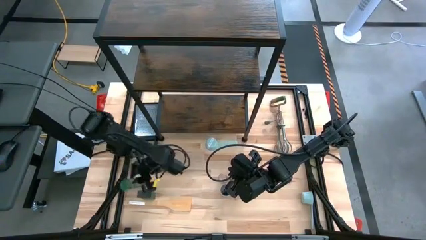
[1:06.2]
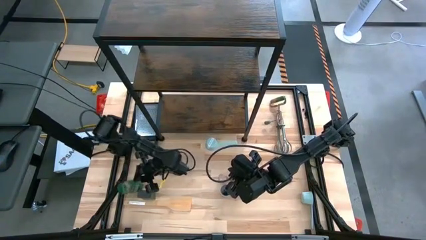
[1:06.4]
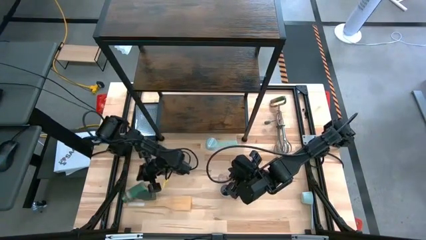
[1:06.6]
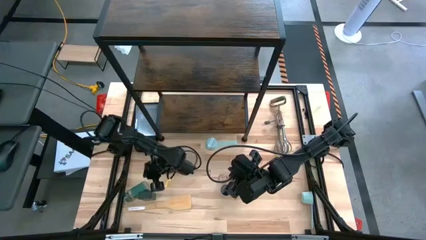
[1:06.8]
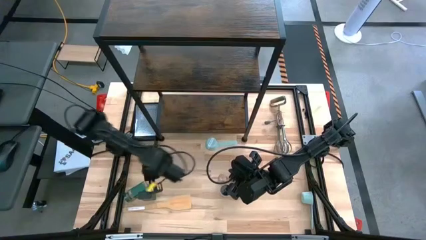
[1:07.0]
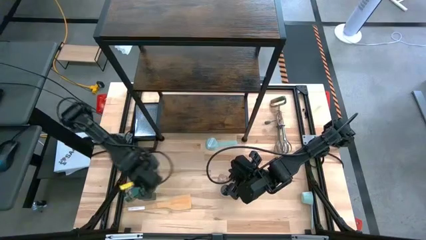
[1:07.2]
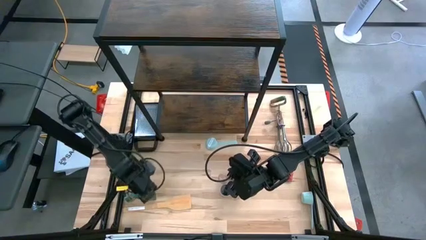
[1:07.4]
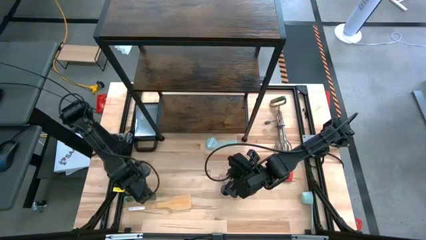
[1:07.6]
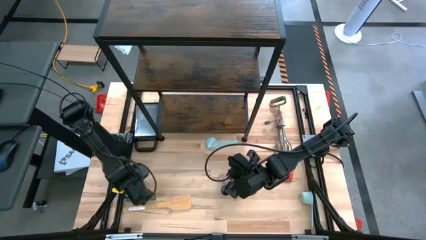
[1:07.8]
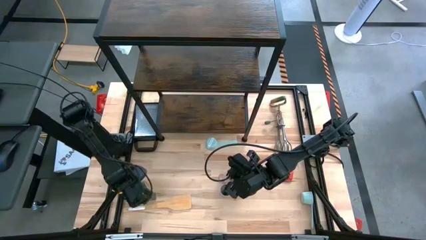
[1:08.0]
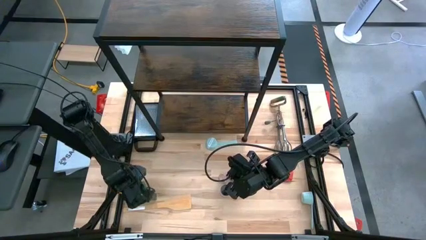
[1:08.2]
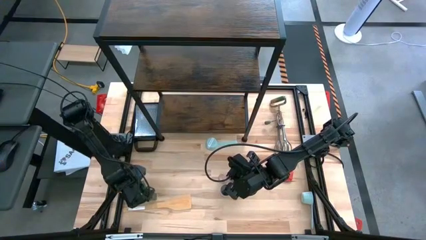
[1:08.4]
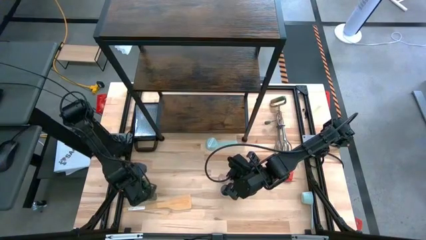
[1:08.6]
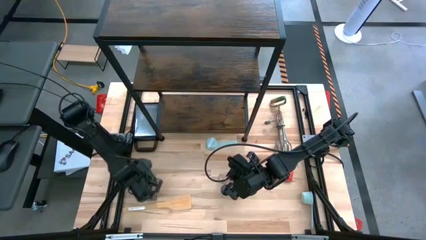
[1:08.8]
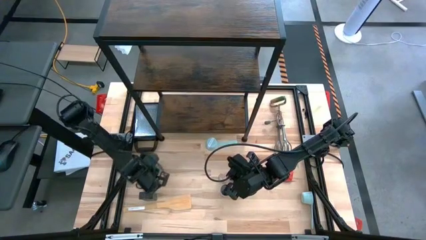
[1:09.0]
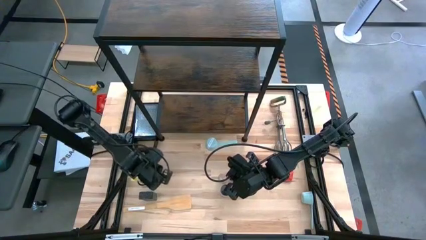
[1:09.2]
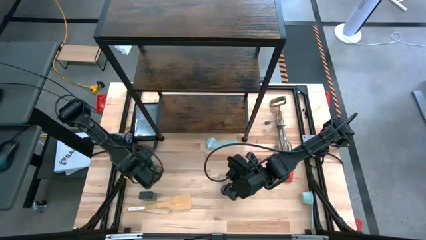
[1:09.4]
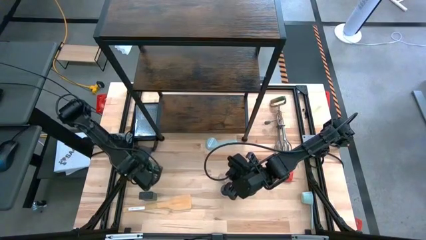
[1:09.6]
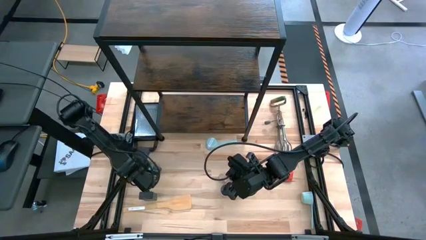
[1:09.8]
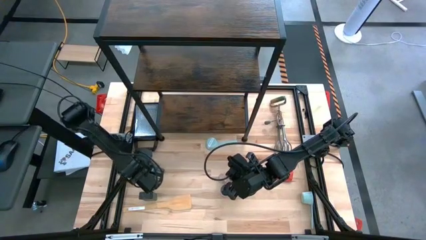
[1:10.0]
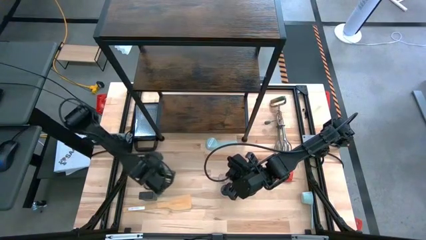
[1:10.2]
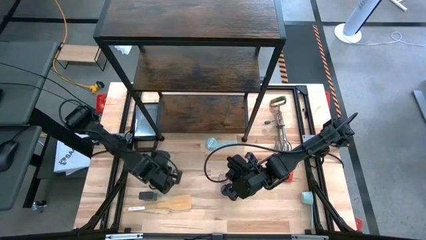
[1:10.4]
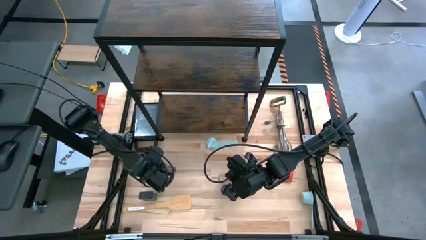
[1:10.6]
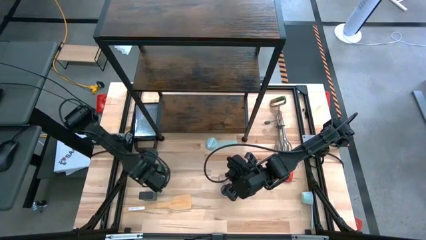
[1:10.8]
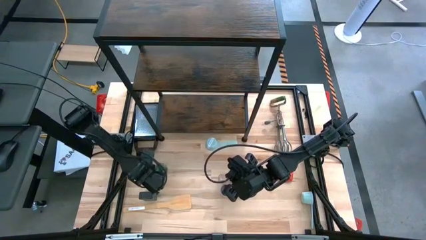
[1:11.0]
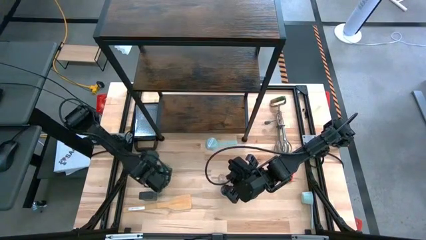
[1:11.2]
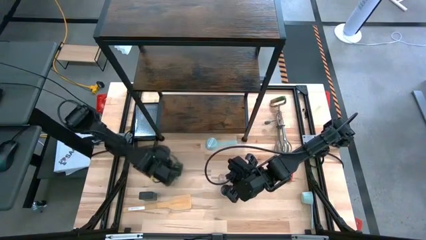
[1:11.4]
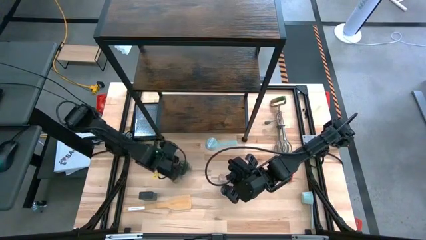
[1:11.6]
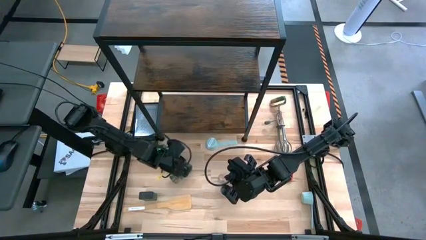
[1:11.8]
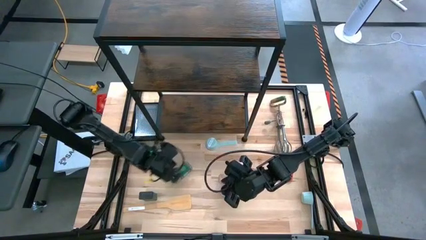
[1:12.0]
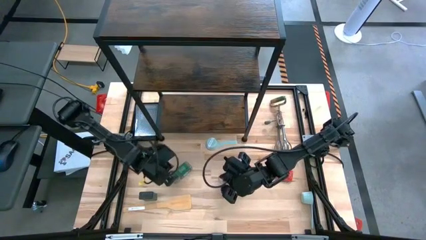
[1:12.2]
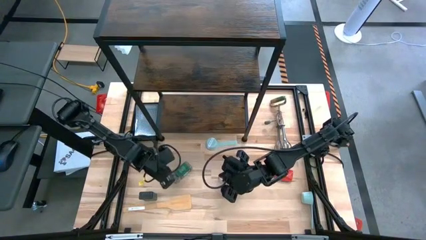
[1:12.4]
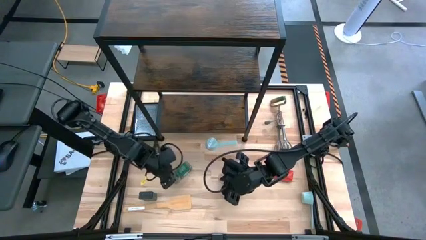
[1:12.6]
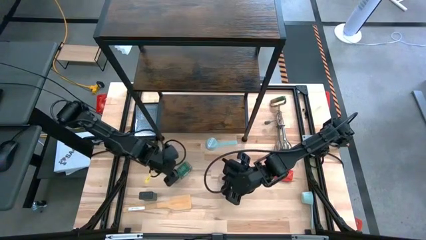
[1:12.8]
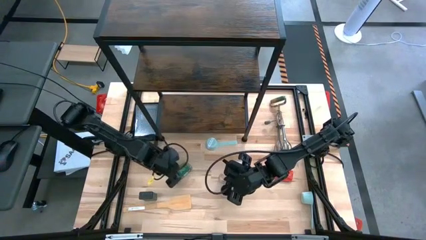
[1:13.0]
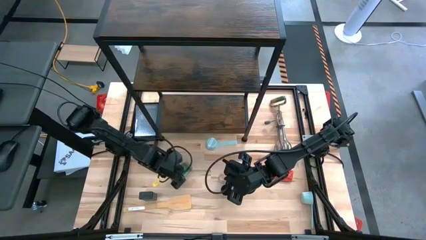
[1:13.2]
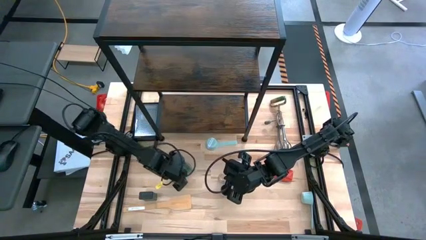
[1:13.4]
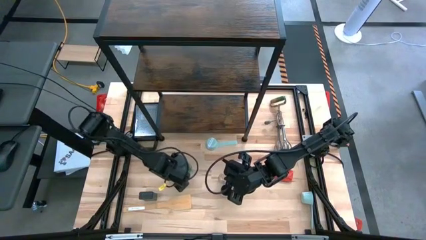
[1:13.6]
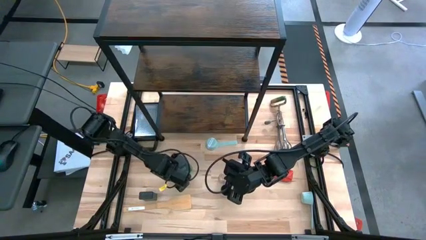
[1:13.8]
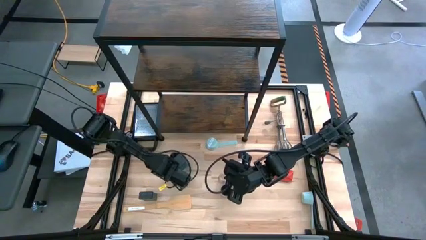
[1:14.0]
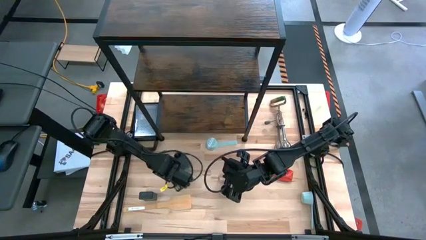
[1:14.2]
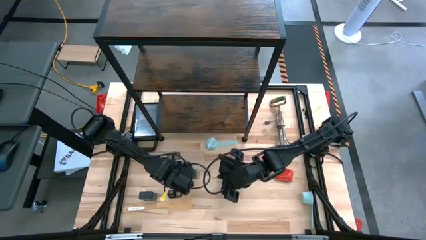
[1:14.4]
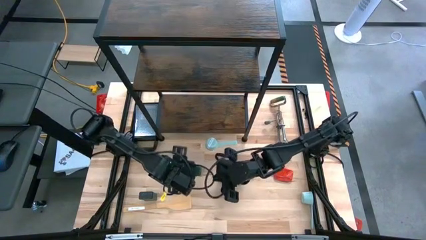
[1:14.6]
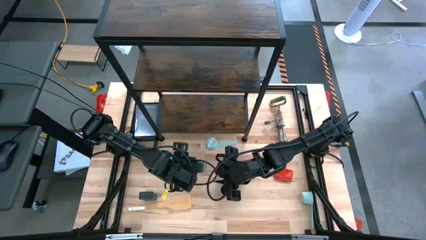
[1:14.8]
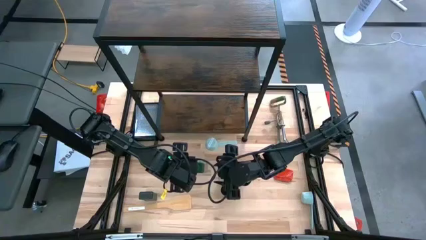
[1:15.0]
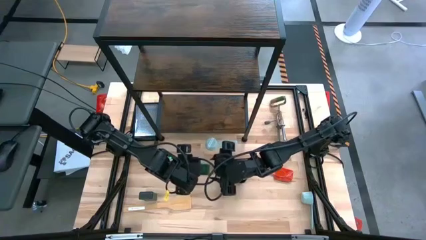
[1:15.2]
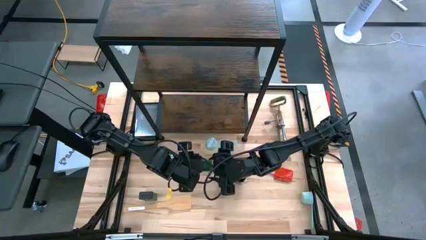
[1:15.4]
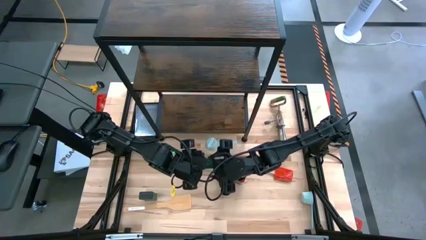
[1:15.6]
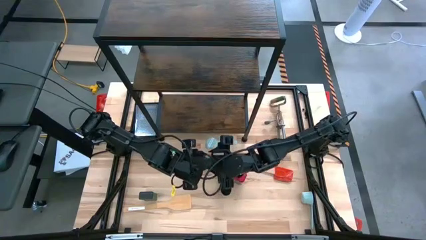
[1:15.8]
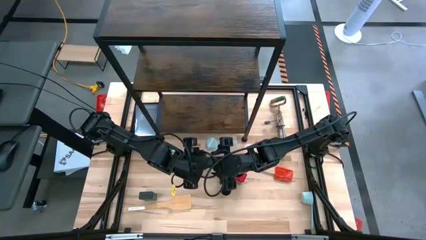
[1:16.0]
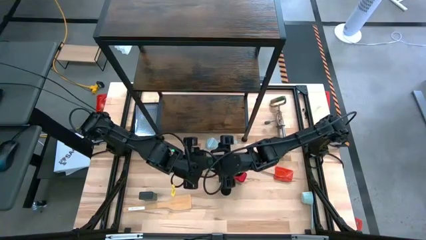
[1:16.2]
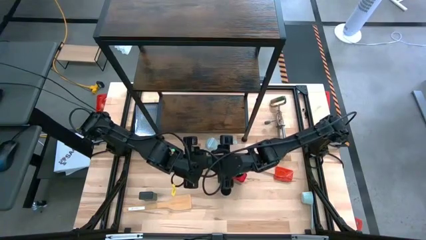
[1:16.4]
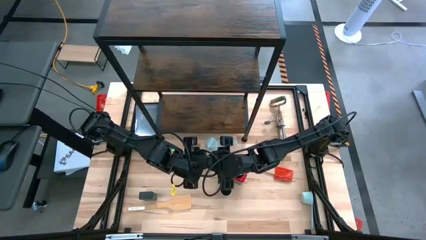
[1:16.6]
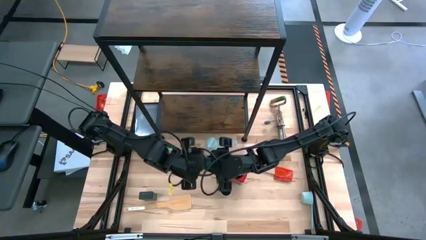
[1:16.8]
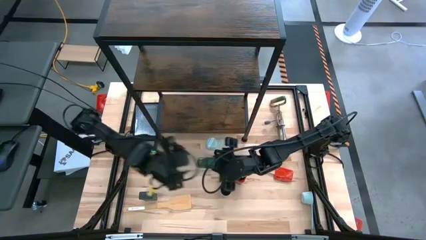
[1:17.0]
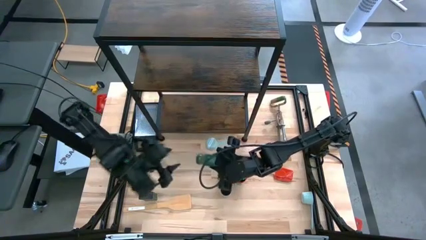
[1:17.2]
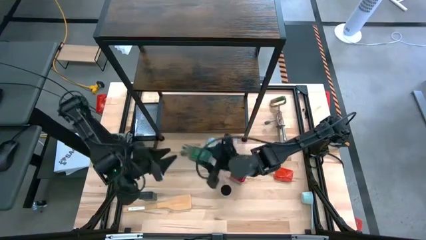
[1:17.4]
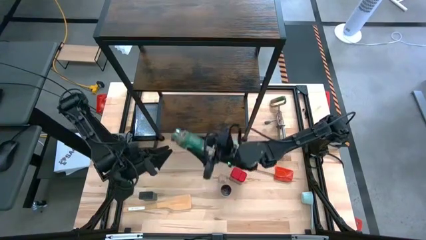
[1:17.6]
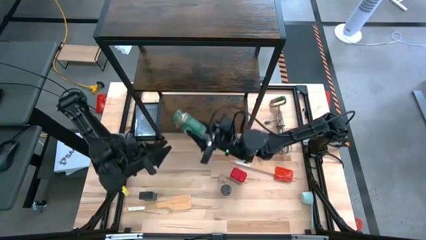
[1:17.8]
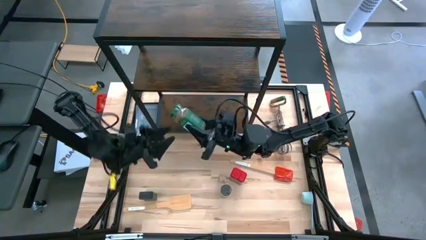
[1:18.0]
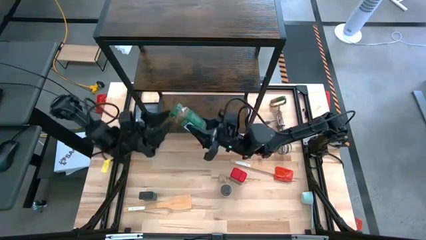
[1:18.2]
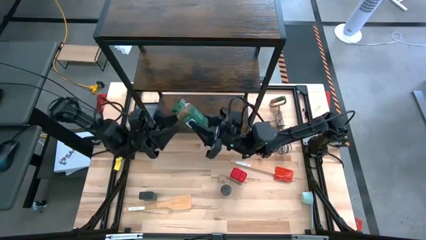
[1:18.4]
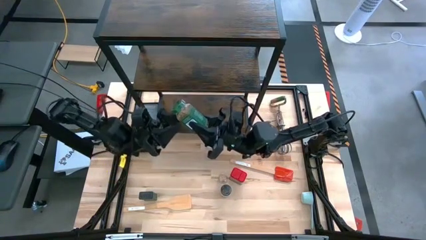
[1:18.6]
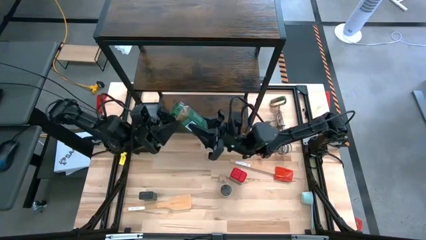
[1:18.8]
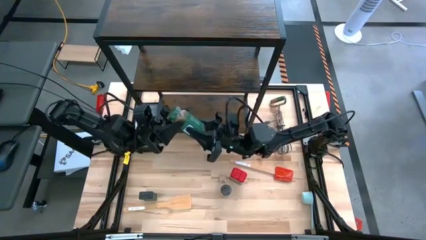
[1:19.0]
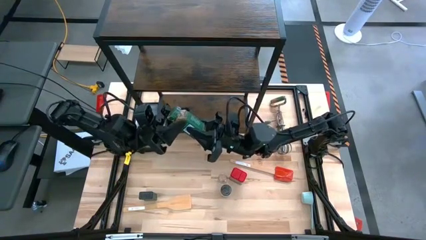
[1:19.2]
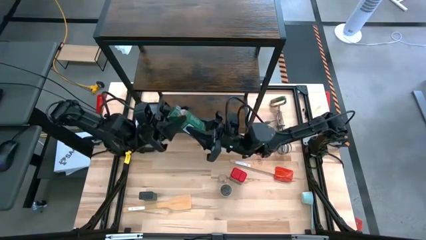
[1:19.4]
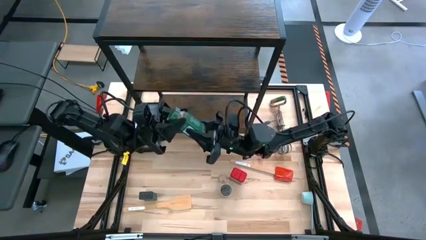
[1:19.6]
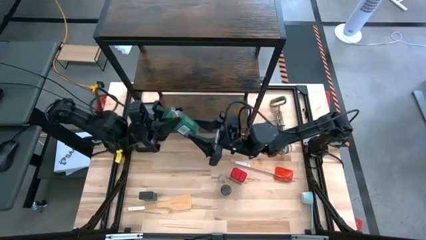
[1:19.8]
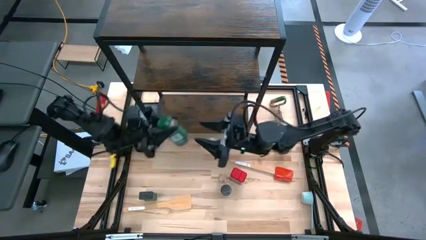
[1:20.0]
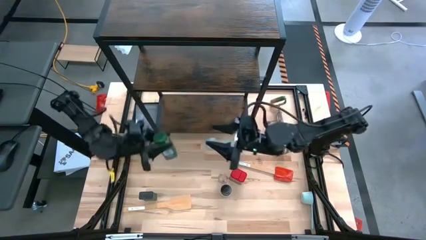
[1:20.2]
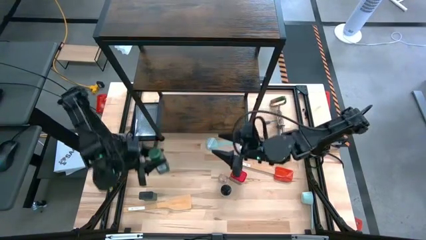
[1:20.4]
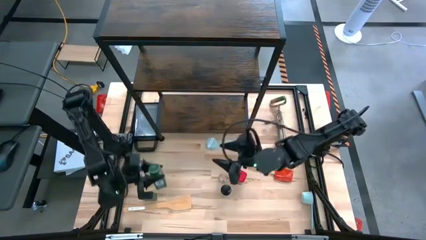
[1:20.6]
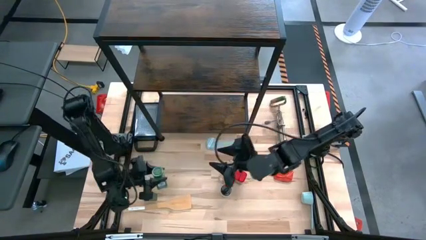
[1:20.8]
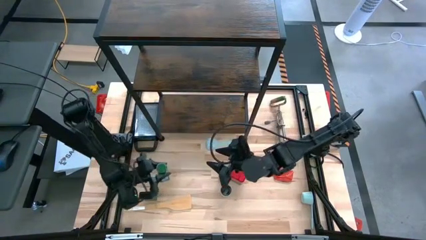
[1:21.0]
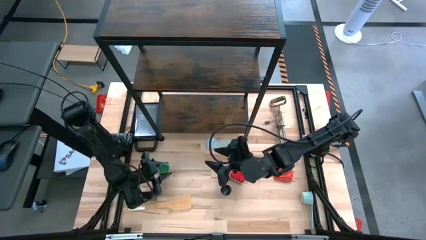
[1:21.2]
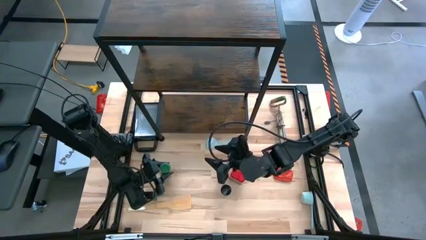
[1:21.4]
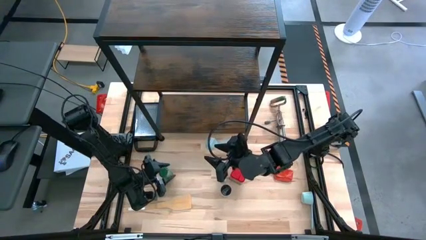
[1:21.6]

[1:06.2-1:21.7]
Task: Shelf spices
Adjust the green seasoning bottle on the table
